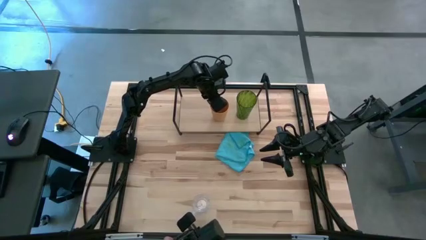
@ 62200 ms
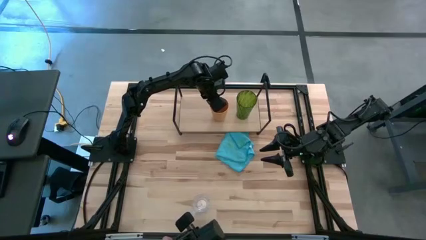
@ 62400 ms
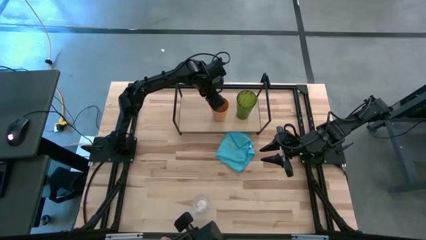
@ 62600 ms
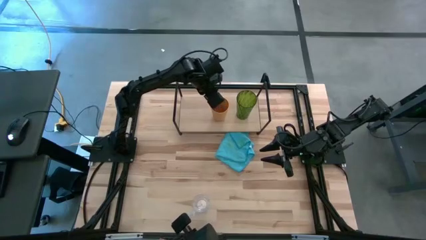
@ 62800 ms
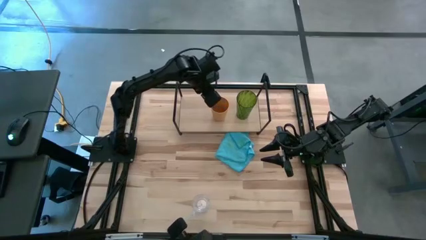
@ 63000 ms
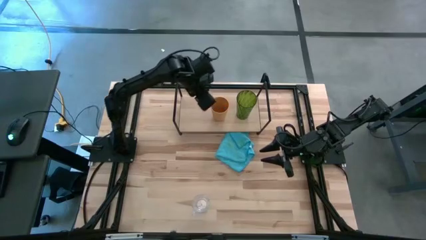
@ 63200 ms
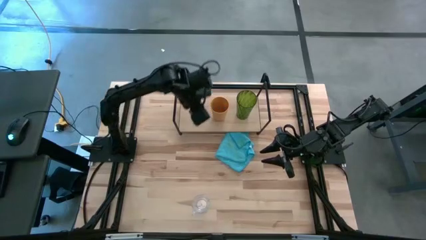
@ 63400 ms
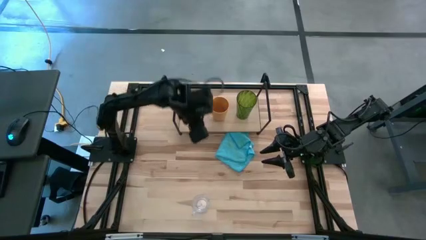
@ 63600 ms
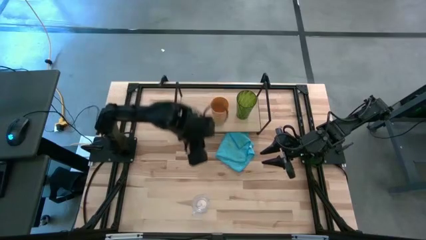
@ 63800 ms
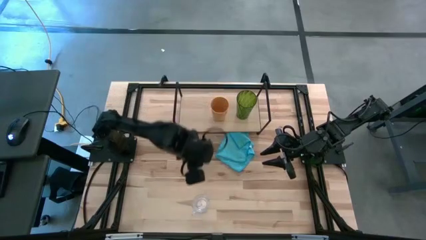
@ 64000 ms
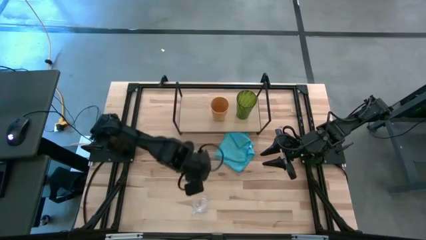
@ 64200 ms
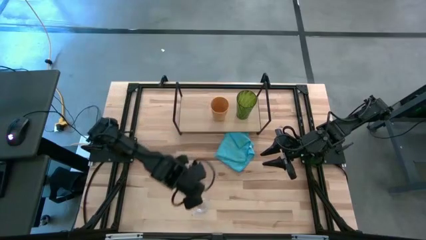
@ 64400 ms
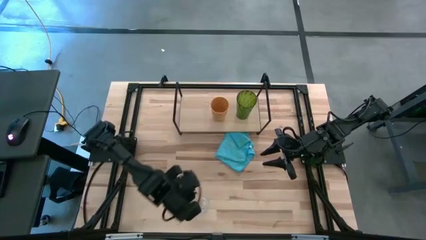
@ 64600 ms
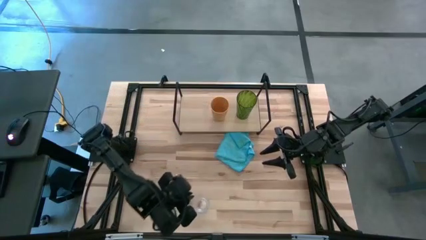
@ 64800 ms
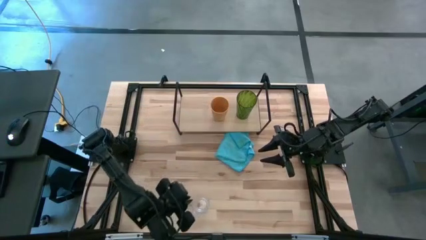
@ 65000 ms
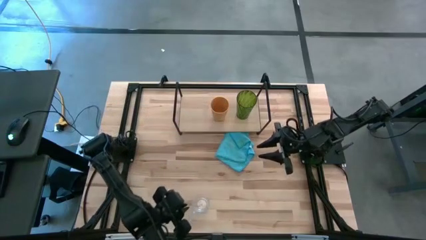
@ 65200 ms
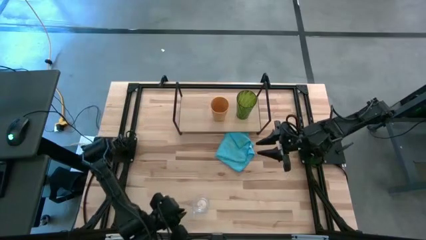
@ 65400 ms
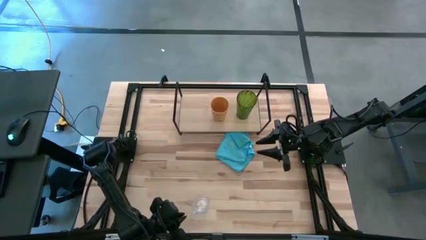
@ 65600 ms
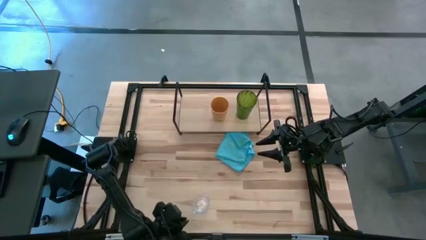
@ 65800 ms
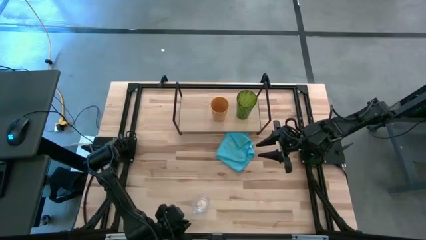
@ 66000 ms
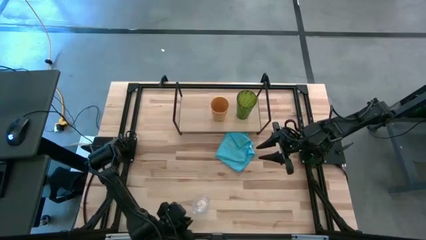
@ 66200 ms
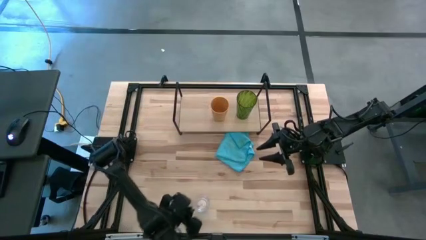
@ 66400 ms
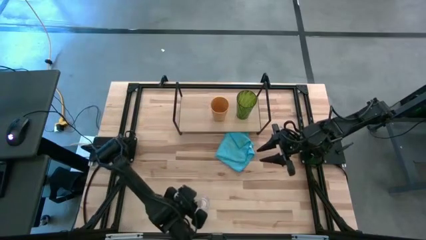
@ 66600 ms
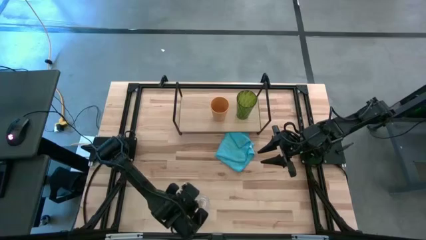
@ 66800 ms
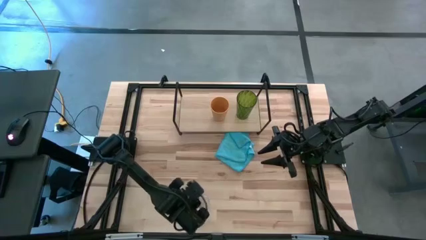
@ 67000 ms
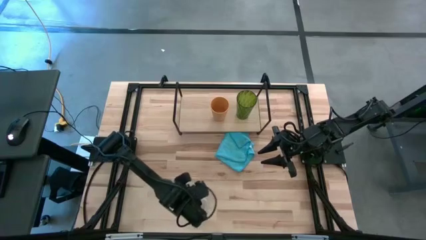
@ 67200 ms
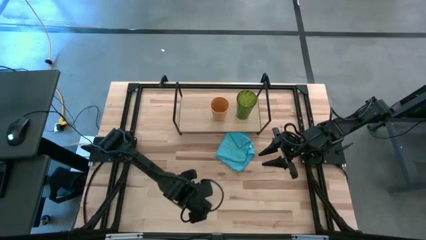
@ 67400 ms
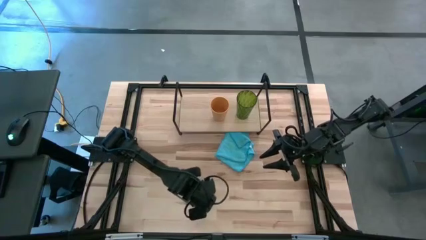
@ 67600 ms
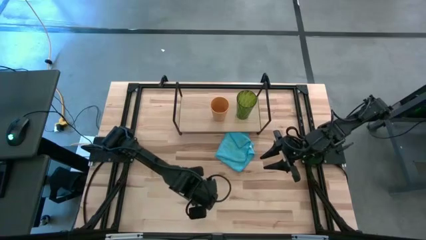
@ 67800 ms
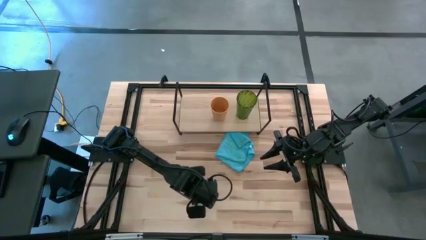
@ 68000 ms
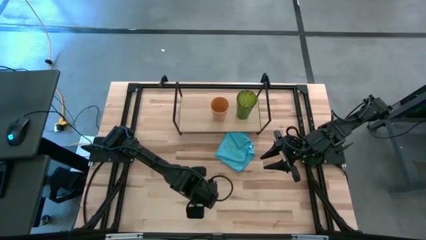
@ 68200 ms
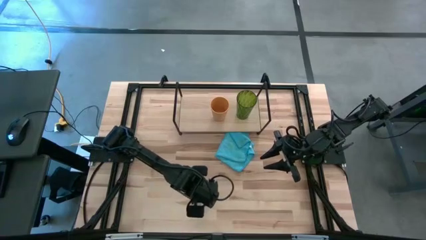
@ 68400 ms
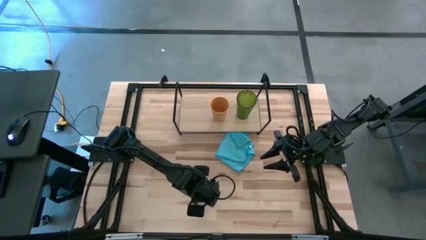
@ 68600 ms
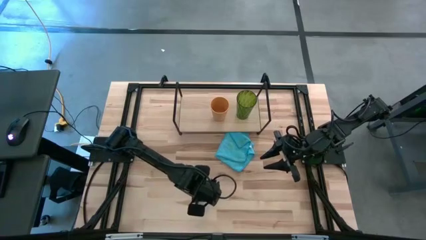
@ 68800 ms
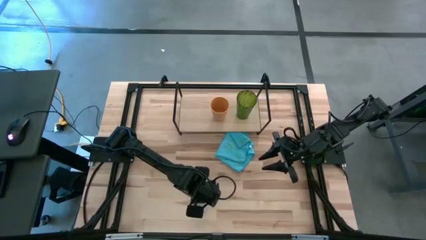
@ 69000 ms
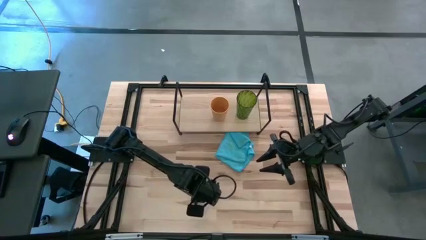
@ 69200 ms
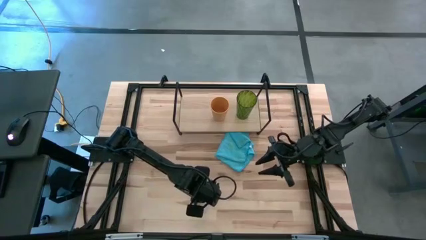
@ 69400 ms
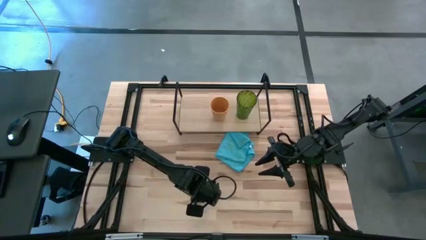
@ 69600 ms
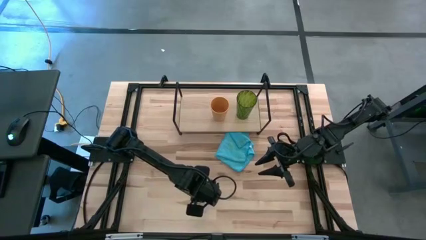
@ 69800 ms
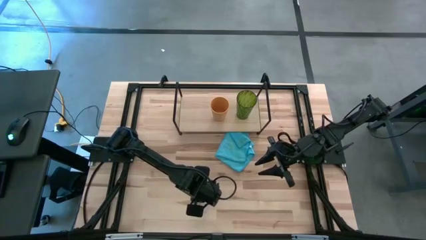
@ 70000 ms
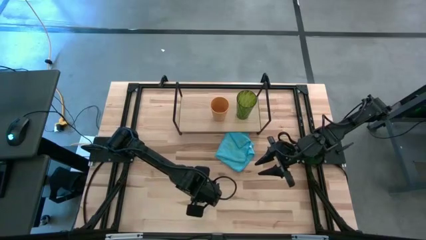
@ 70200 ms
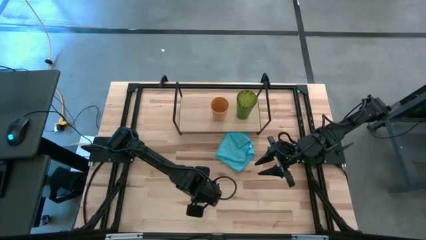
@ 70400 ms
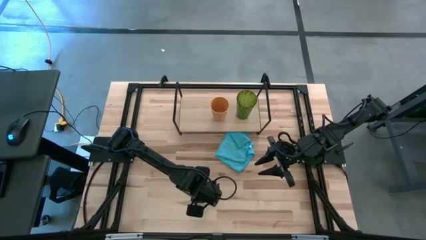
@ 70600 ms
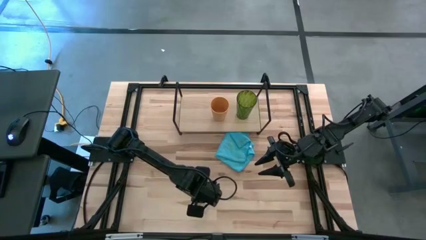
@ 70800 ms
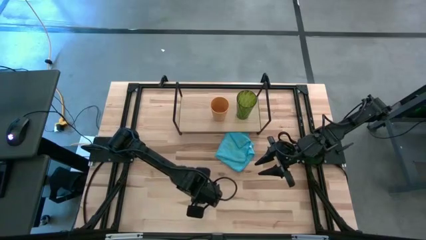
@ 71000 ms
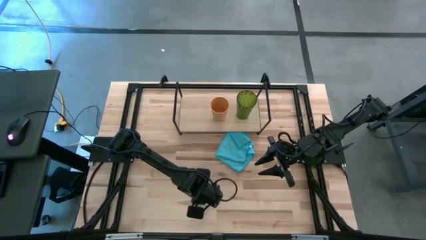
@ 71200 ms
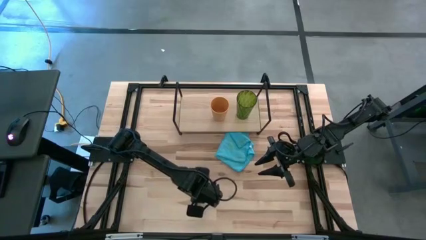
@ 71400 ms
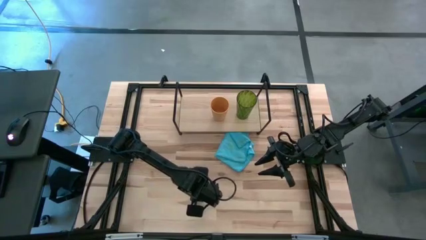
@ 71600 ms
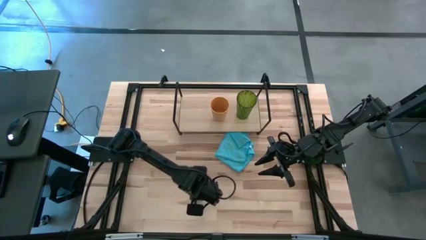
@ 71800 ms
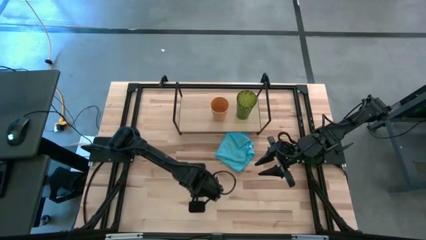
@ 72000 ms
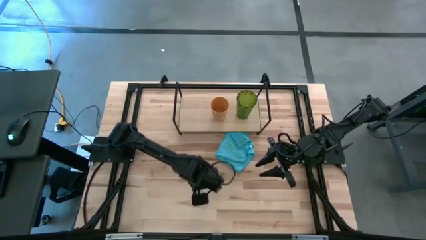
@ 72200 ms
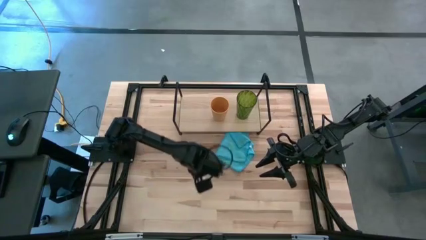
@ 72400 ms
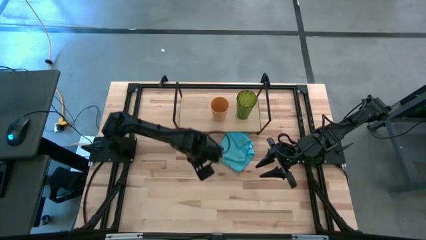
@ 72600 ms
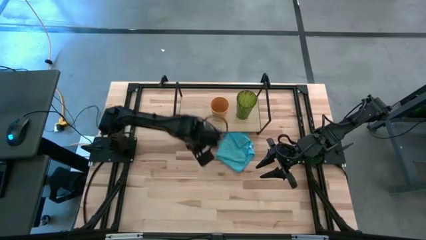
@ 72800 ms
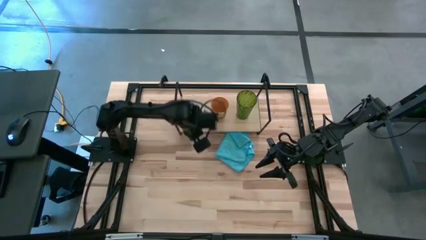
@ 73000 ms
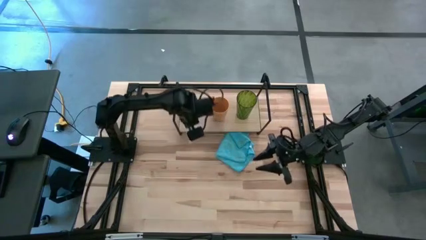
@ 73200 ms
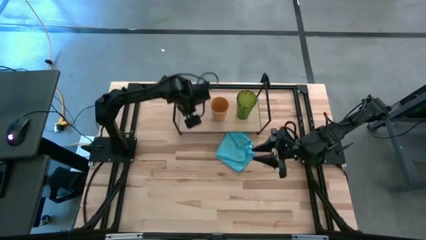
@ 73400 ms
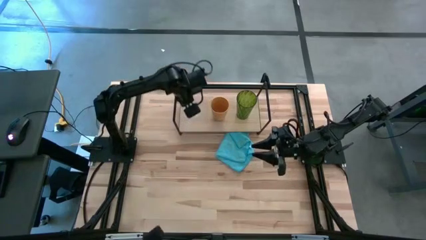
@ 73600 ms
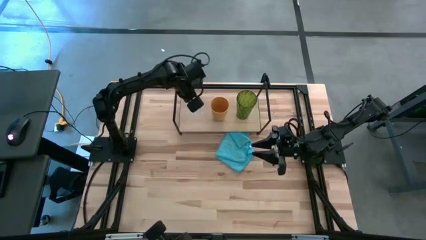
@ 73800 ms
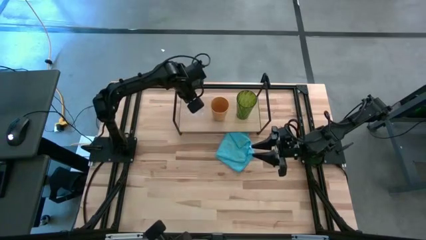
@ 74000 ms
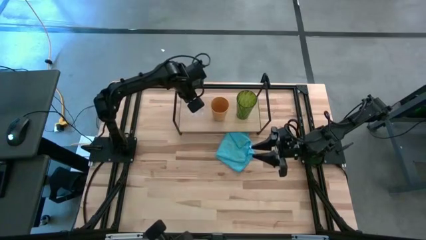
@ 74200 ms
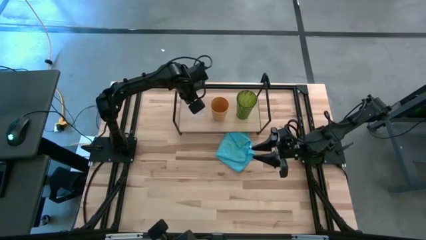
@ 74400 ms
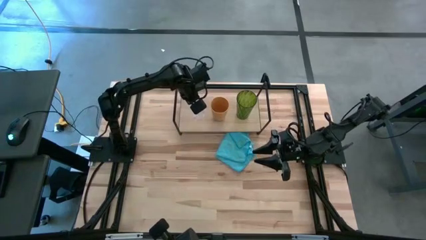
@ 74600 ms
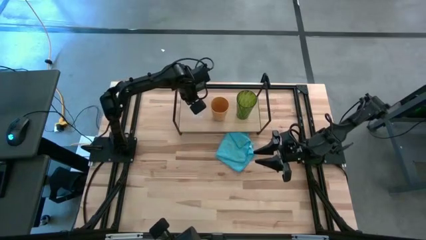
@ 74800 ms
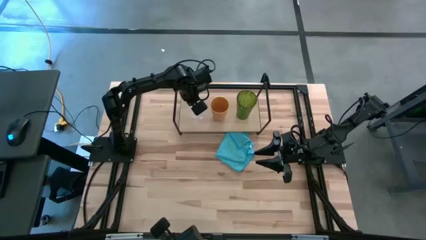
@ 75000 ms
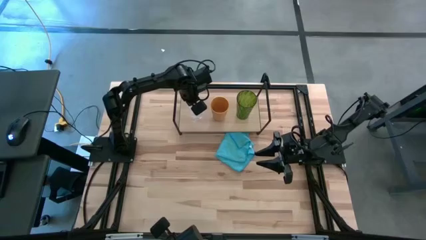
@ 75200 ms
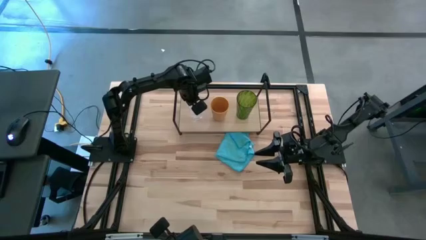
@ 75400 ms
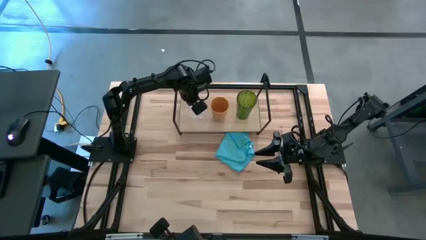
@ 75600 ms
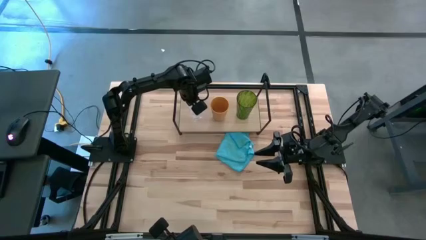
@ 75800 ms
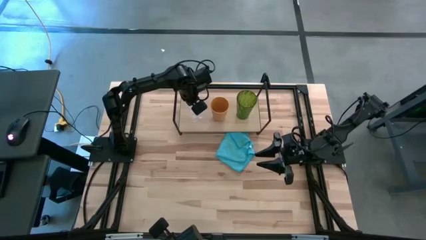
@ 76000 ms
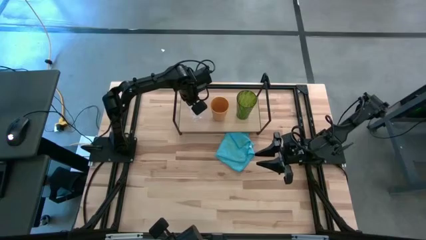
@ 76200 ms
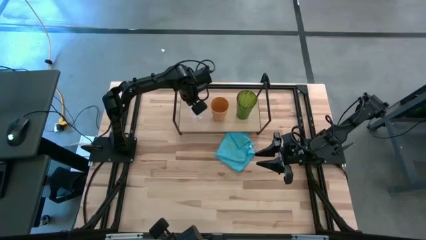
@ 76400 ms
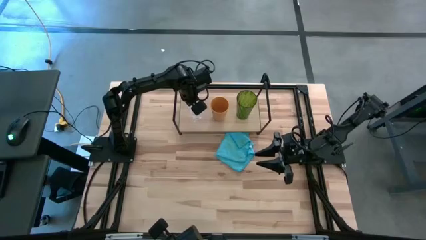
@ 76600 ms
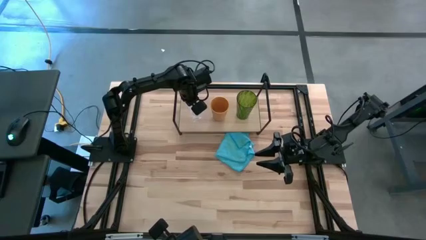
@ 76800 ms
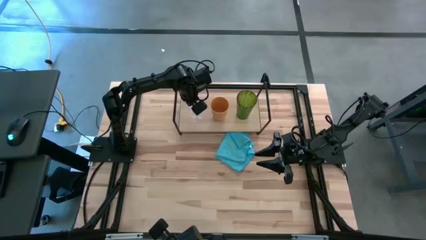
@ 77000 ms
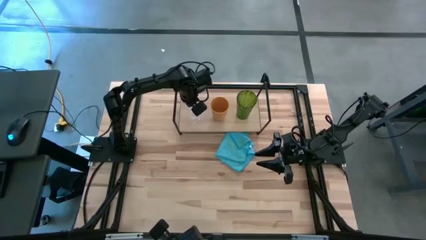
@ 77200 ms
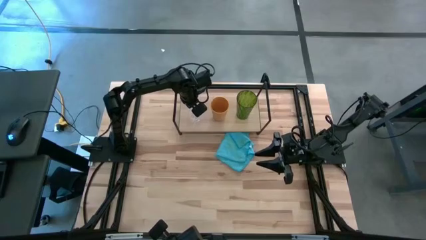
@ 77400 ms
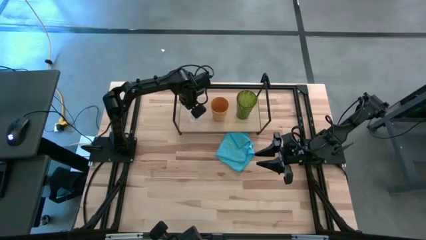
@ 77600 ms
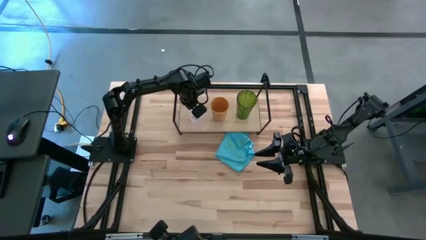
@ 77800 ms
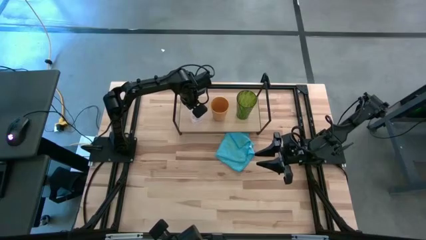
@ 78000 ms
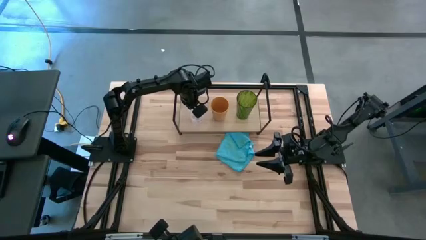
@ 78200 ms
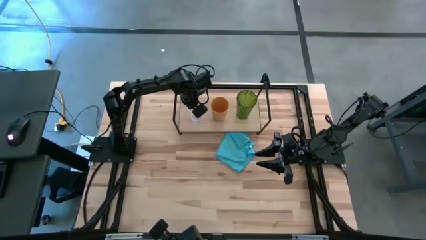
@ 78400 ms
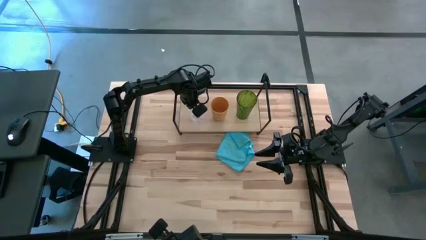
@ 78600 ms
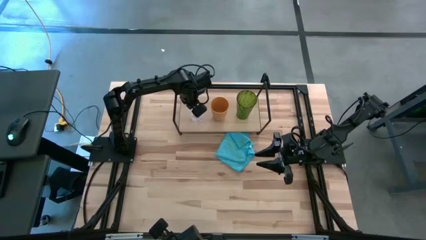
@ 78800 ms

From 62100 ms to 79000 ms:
Task: Stack small to large cups/mugs on shelf
Put the transparent mug on the shelf
